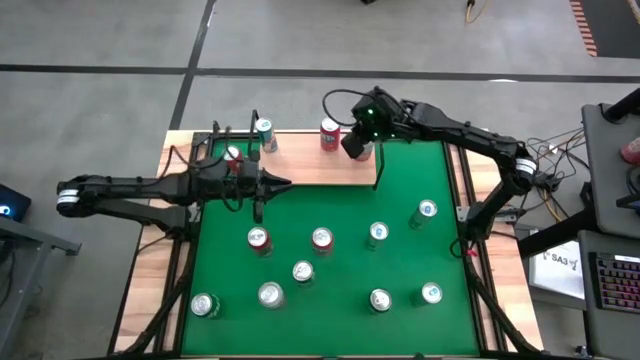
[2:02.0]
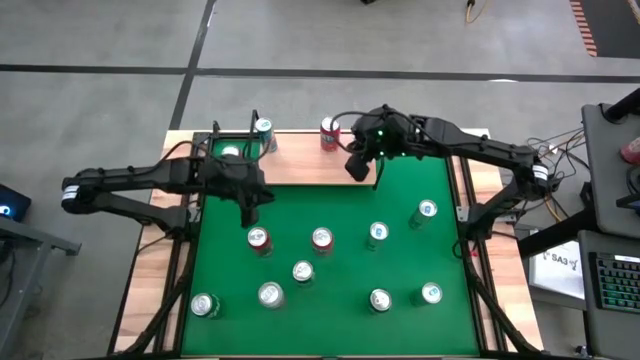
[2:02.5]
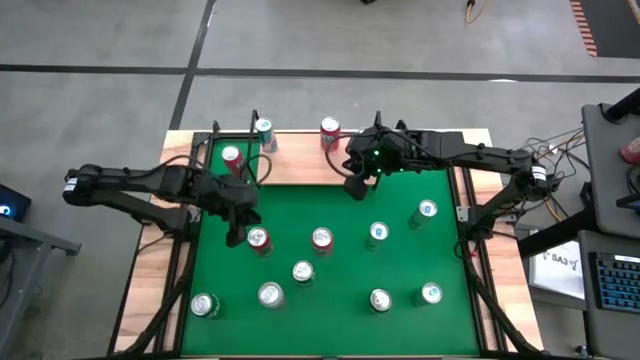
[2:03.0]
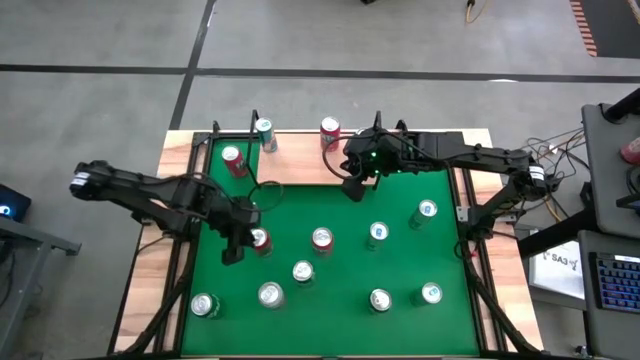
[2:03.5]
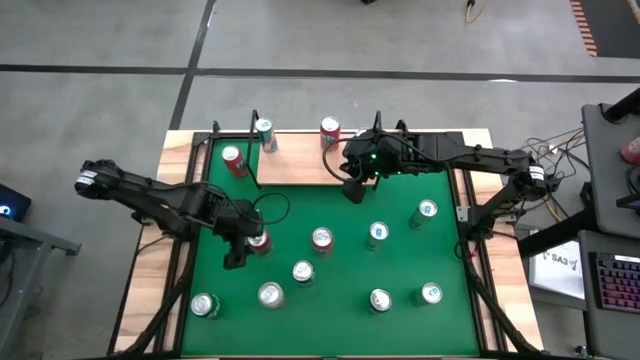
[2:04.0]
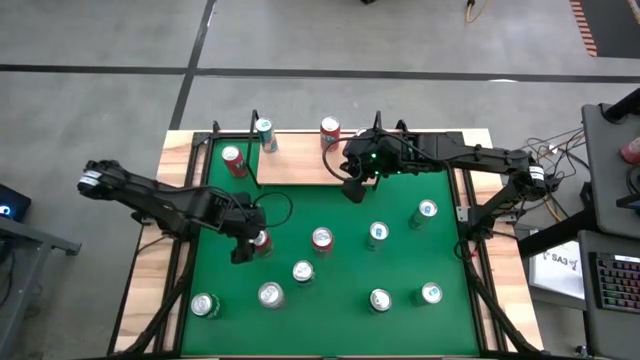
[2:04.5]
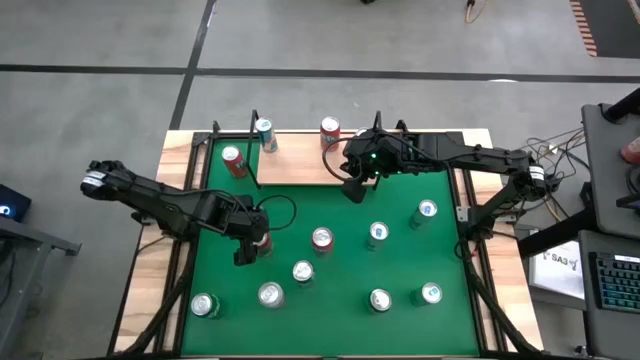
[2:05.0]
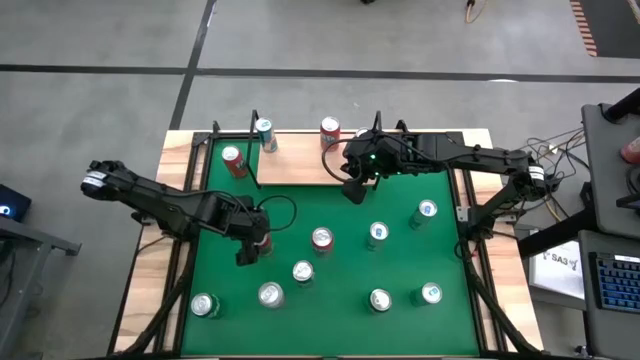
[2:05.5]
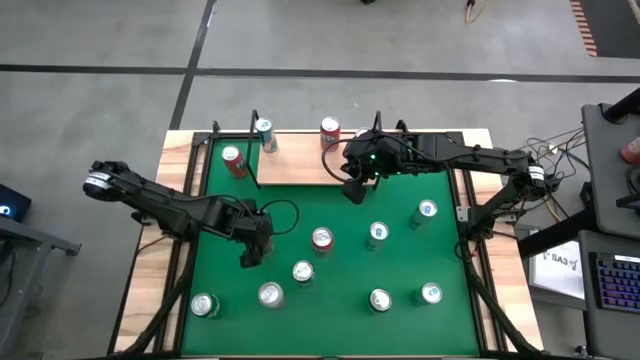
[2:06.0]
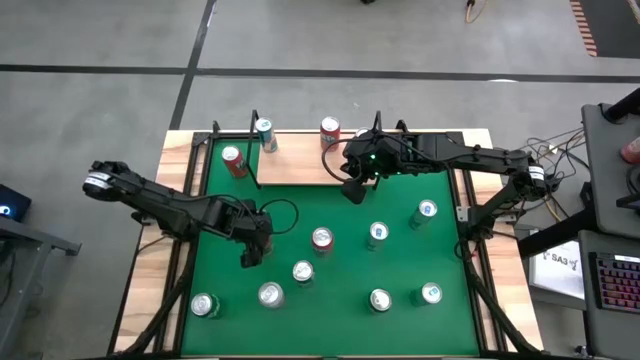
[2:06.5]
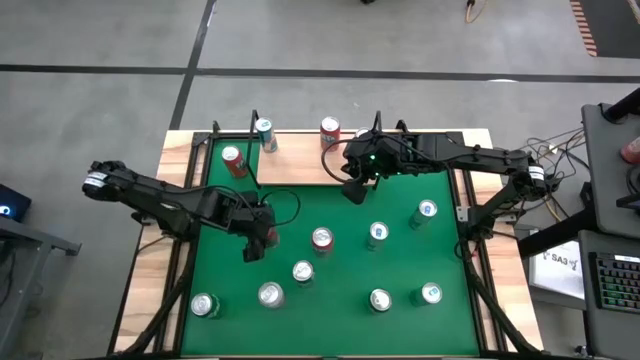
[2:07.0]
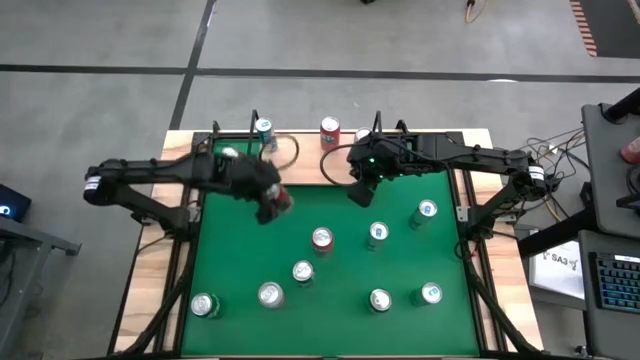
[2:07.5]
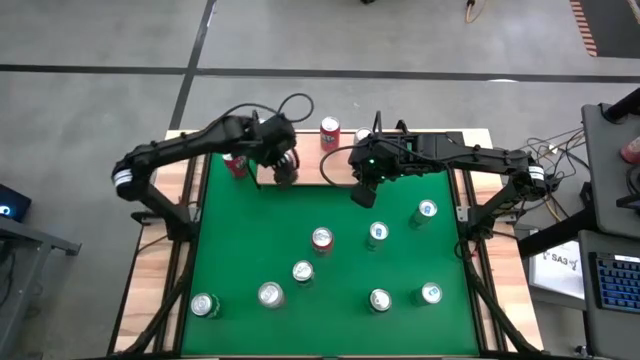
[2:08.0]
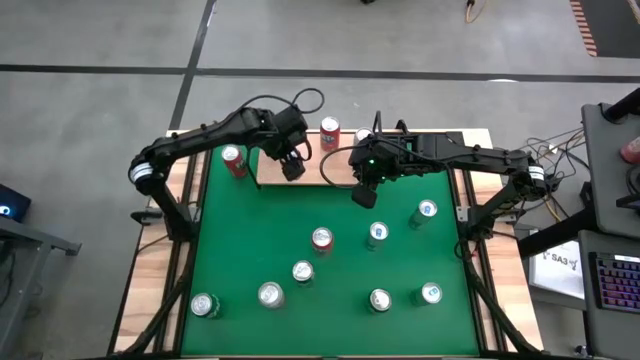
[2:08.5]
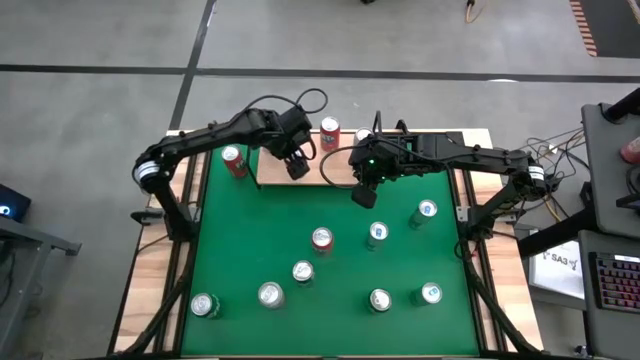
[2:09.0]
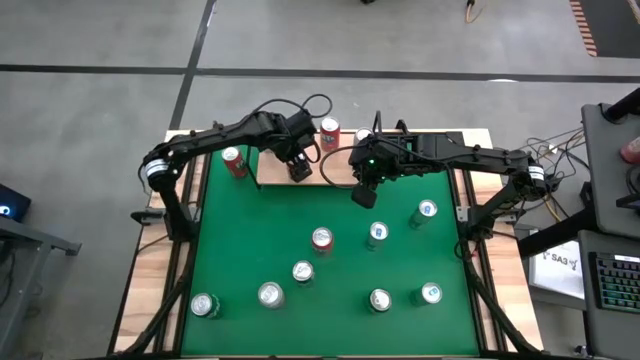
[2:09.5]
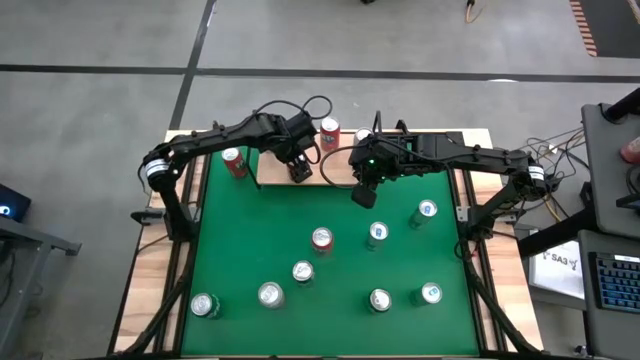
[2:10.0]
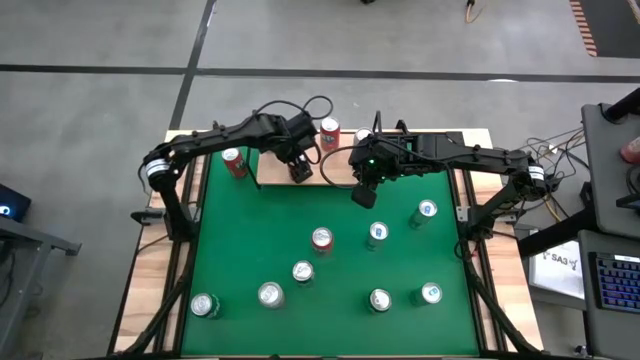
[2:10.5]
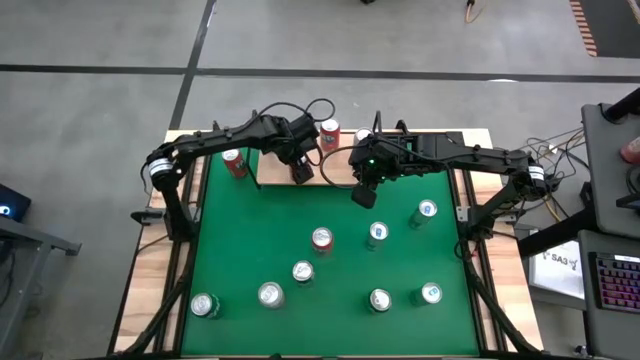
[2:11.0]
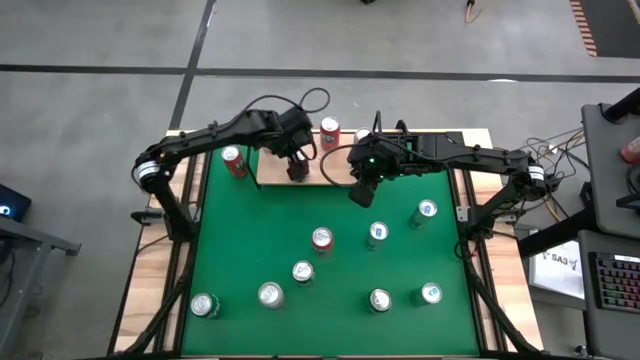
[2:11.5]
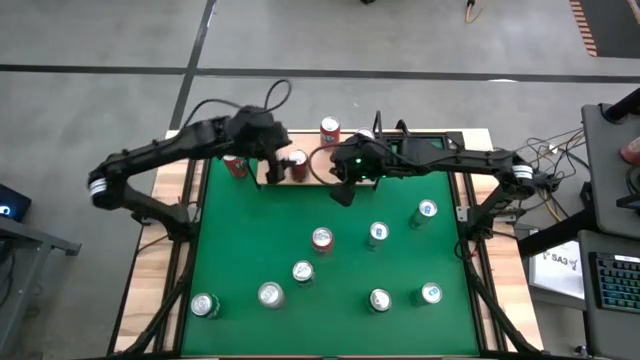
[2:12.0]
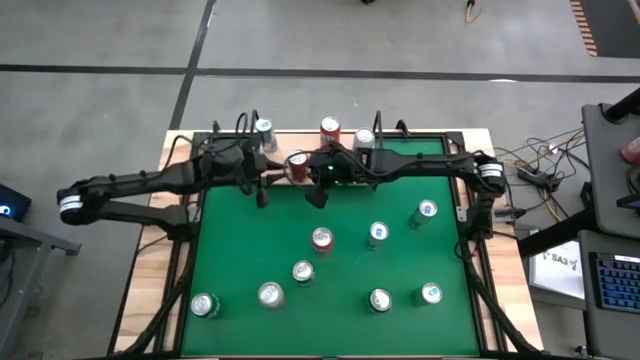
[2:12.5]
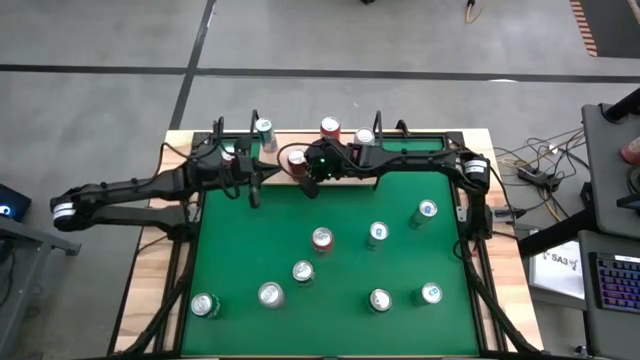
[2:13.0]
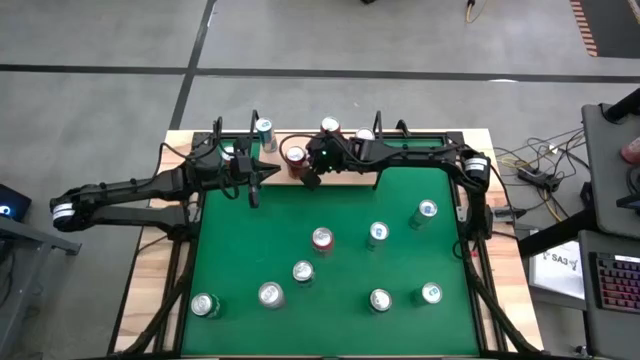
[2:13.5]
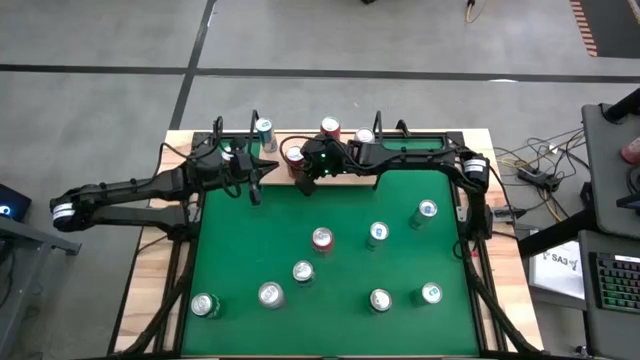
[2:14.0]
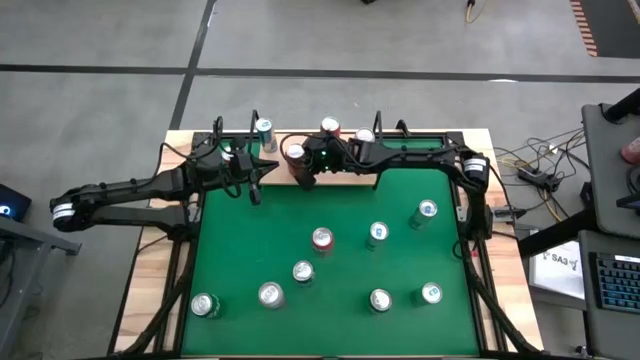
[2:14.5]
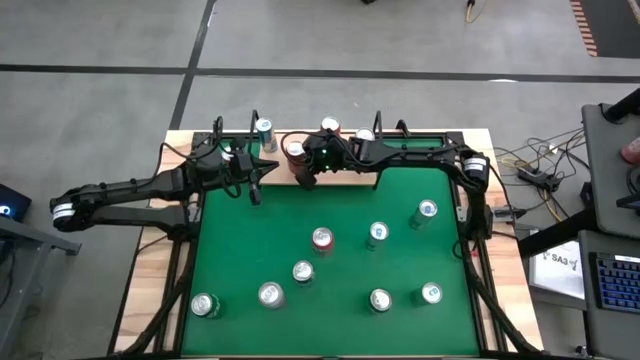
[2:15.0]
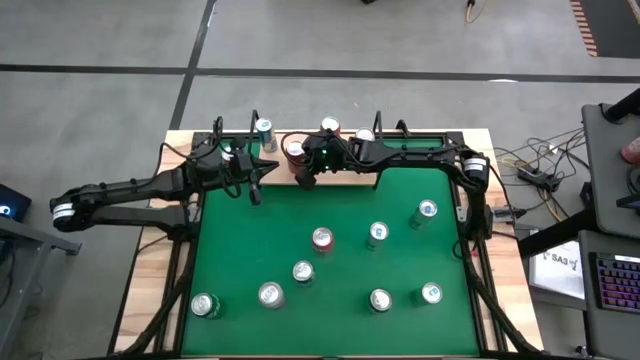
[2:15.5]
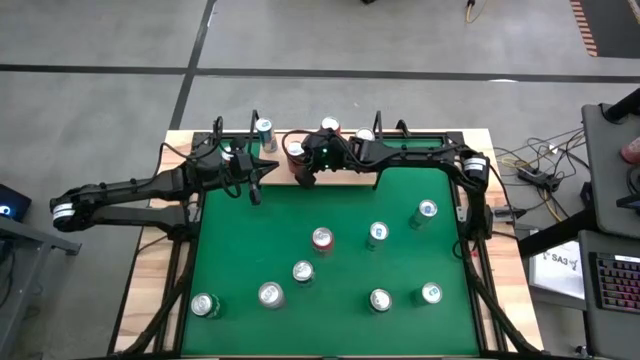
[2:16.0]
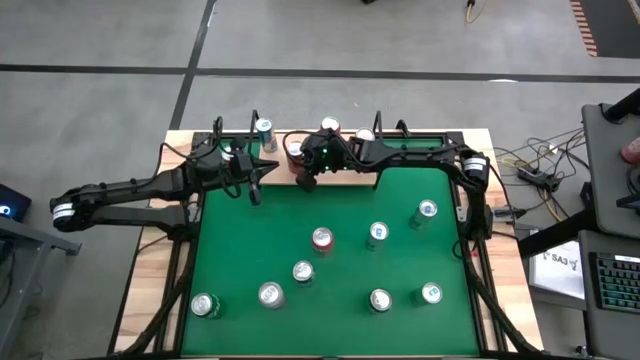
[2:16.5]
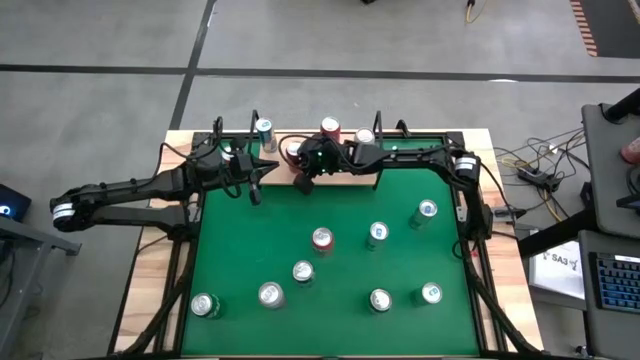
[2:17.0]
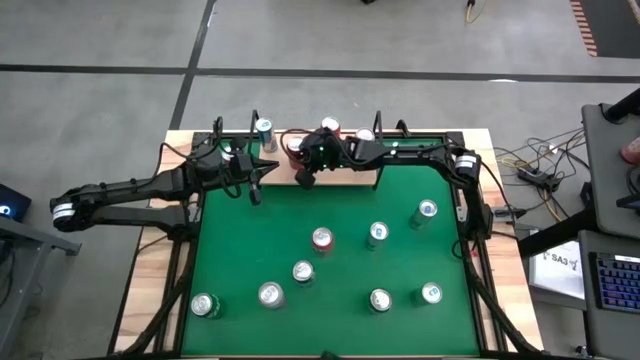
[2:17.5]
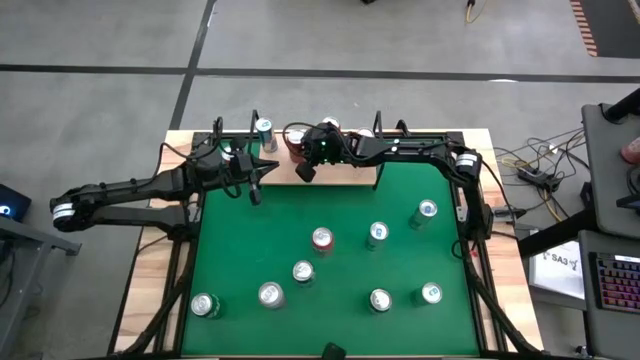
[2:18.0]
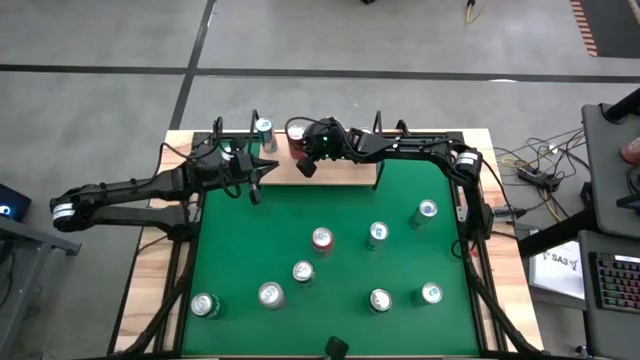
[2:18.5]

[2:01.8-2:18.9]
Task: Pick and place cans onto a shelf
Put the red soda can on the shelf

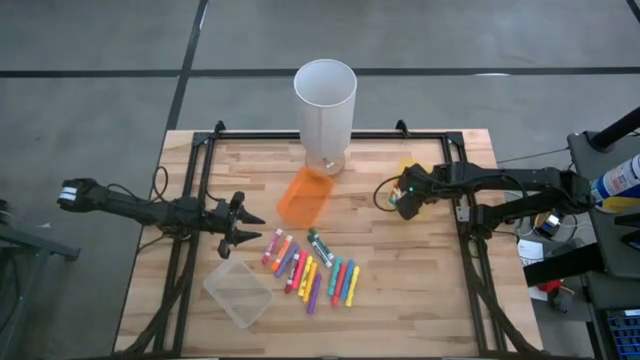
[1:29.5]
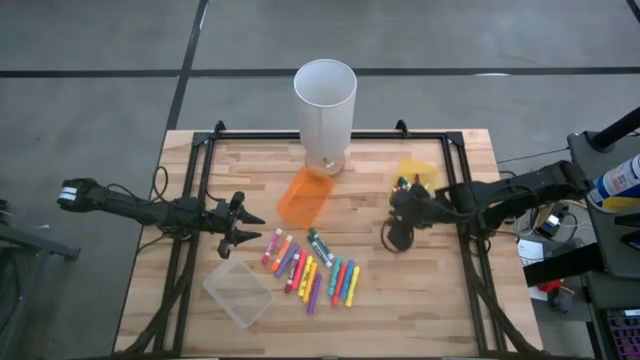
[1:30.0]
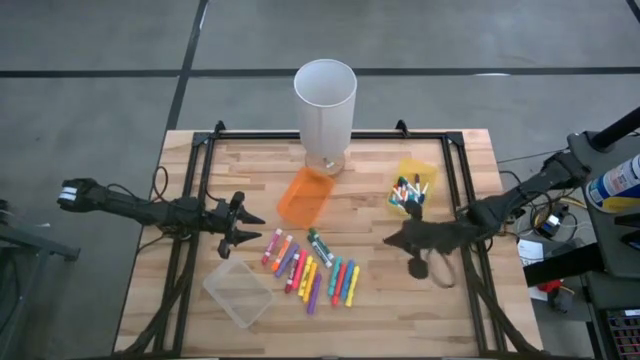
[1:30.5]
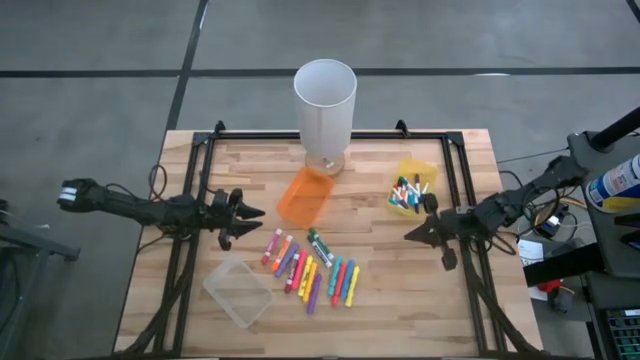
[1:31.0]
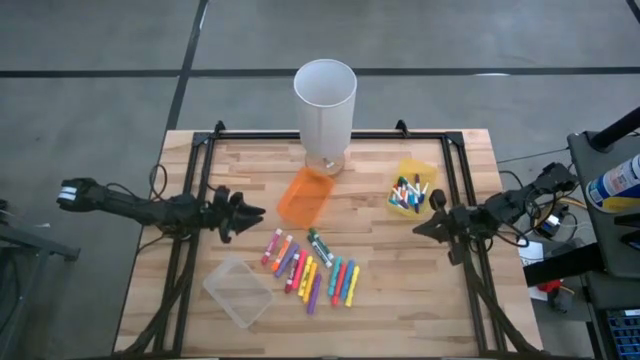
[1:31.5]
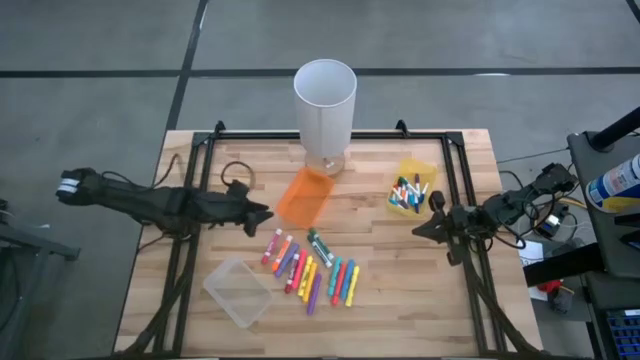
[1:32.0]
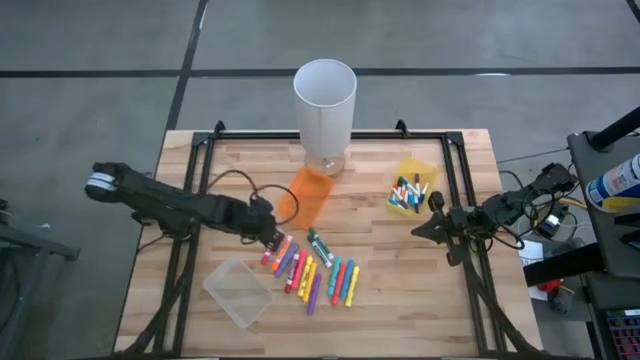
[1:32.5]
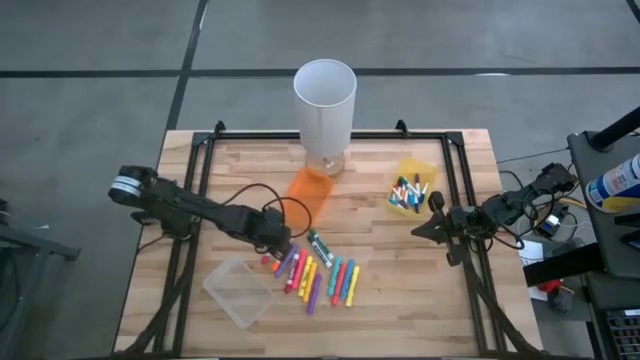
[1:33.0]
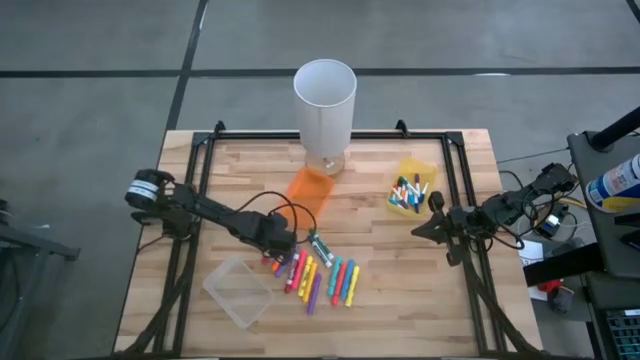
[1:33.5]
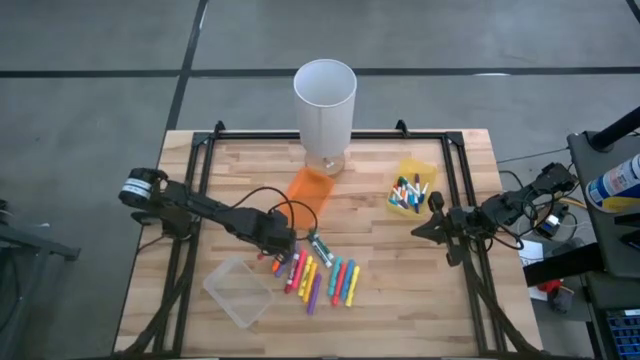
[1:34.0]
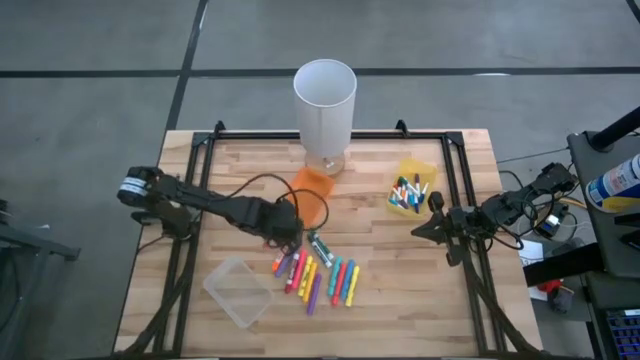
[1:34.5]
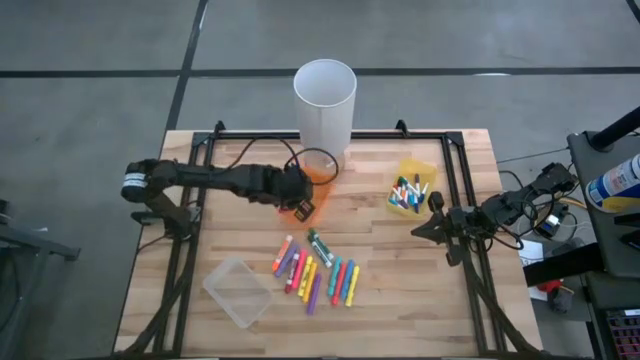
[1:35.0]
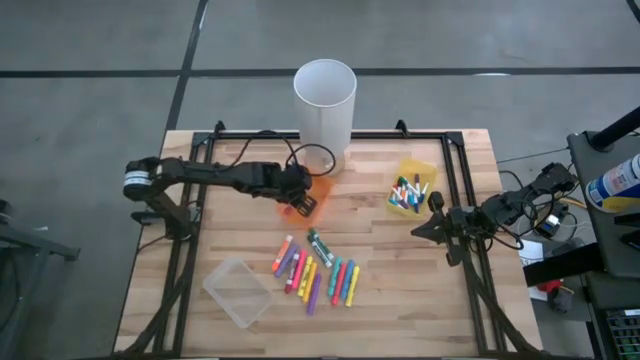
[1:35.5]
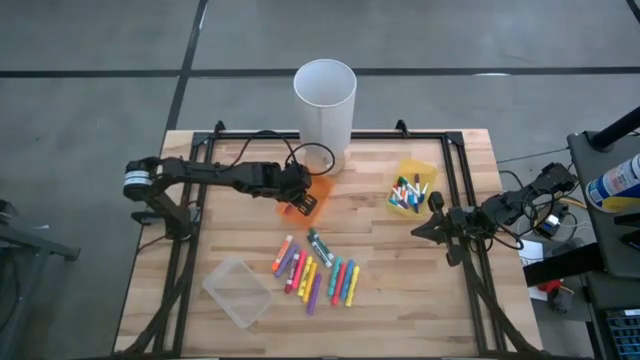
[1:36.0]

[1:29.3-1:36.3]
Task: Pick & Place Markers
Put the large pink marker pen into the orange bin
